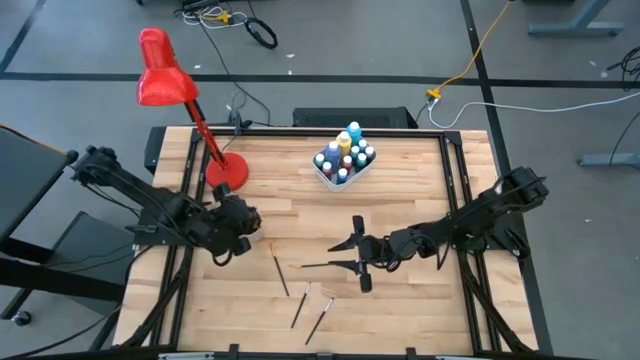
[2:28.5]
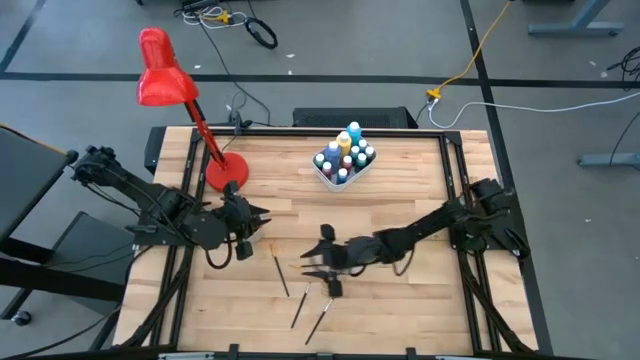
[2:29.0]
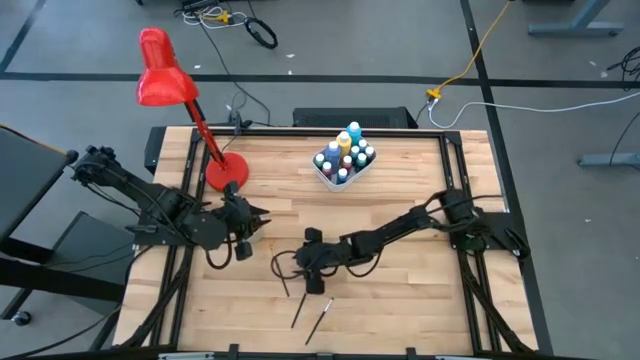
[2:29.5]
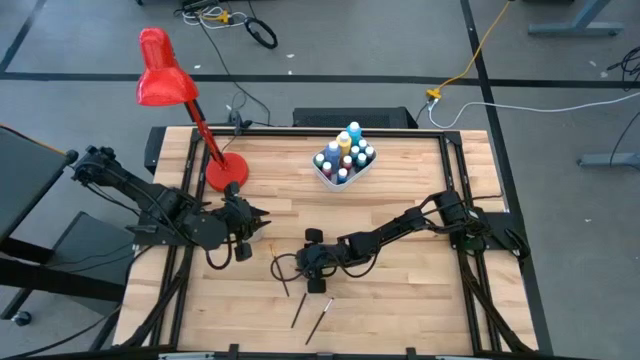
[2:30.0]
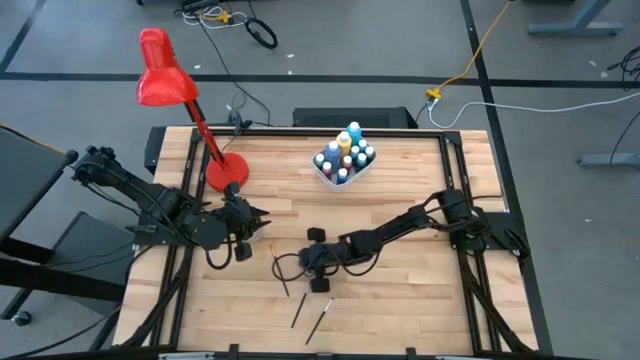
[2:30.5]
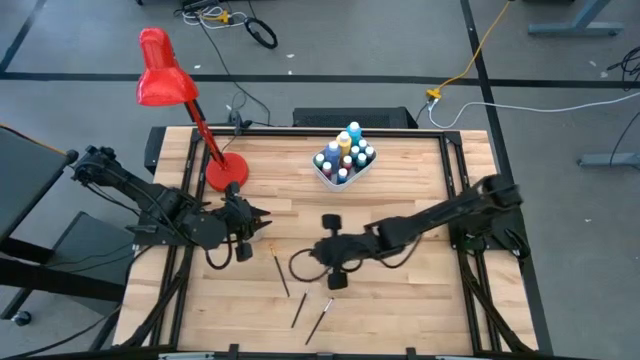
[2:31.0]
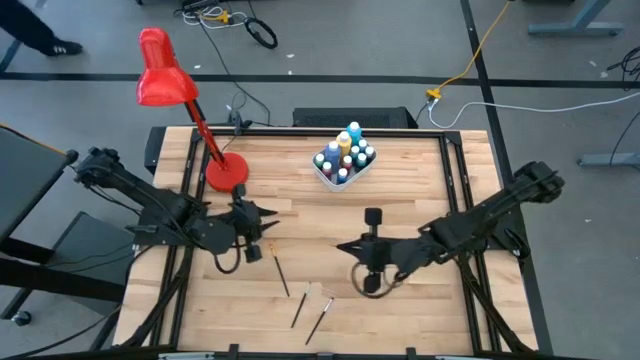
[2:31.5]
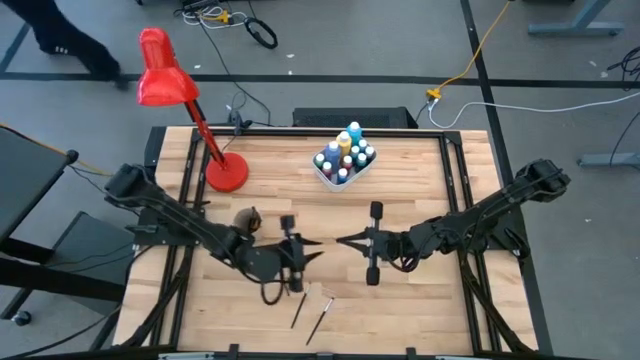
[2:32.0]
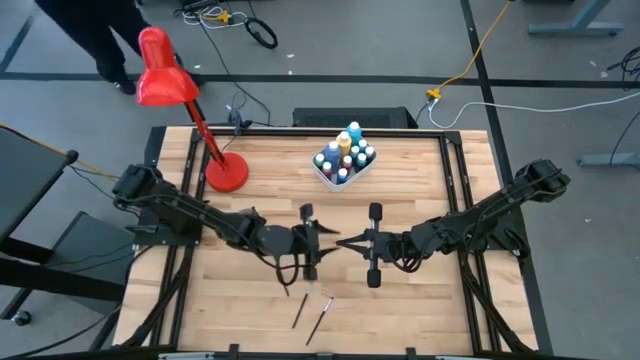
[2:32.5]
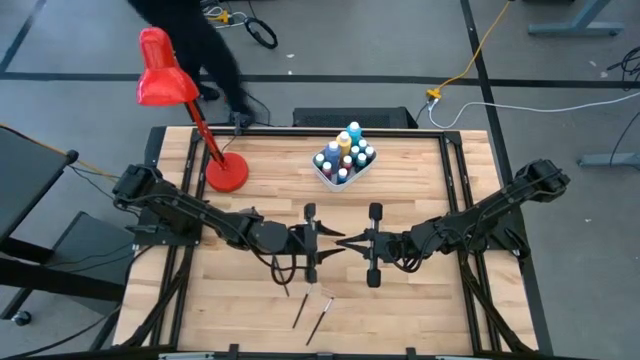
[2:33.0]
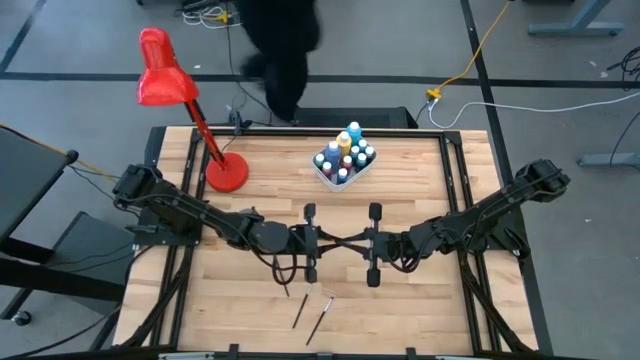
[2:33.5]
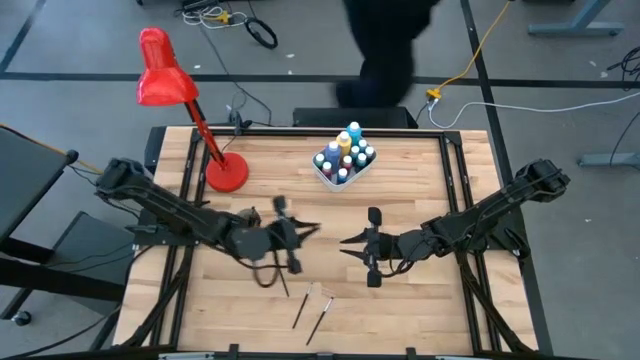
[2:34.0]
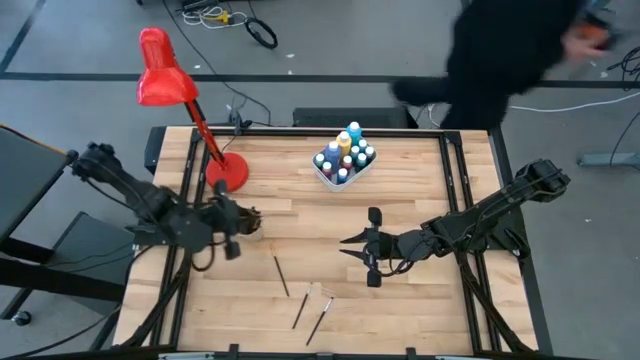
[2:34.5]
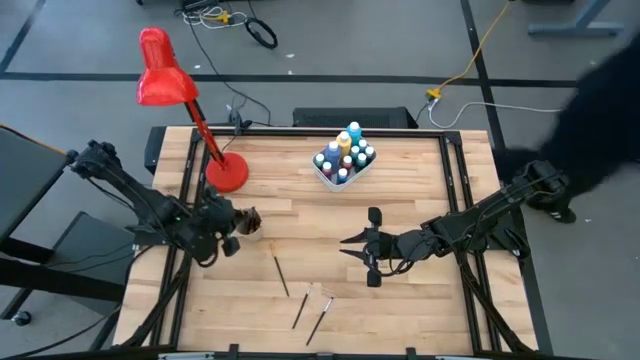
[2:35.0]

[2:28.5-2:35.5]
Task: Pick & Place Paint Supplies
Put the gold paint brush into the white cup

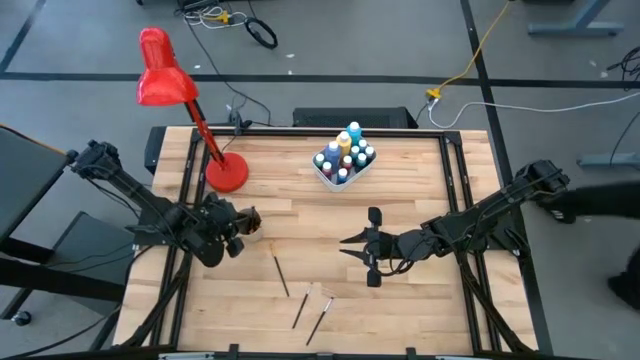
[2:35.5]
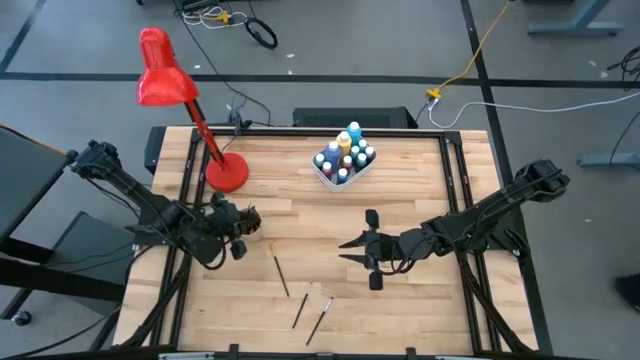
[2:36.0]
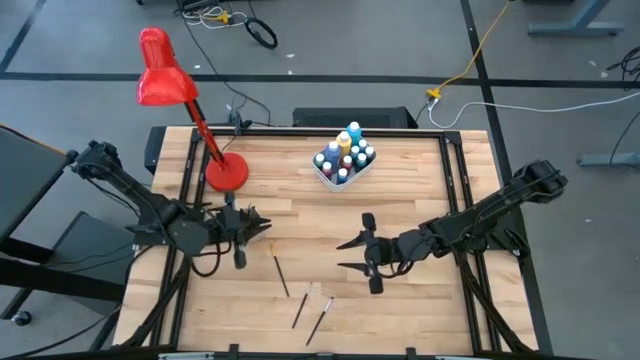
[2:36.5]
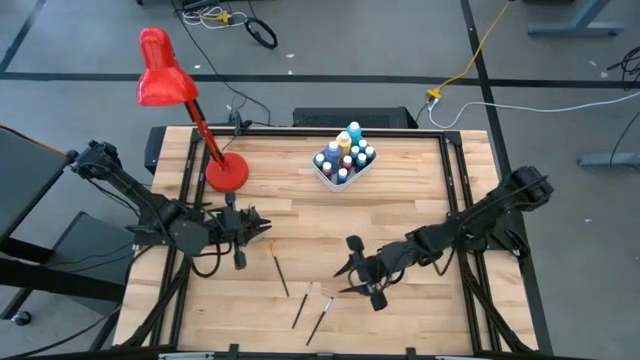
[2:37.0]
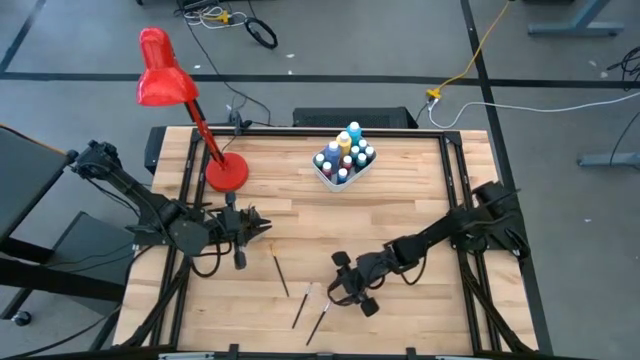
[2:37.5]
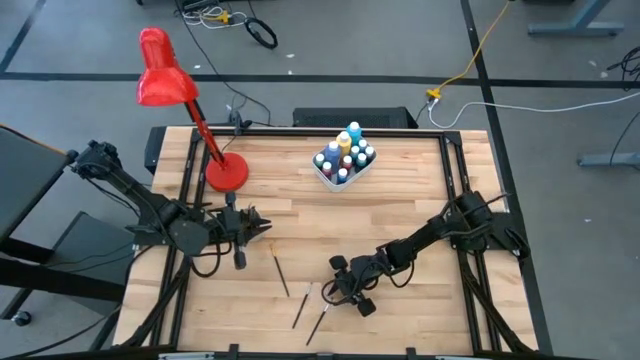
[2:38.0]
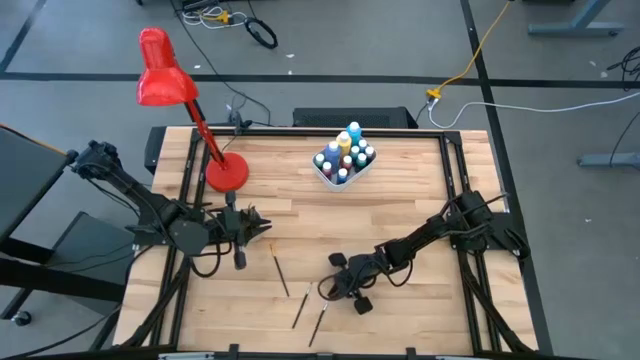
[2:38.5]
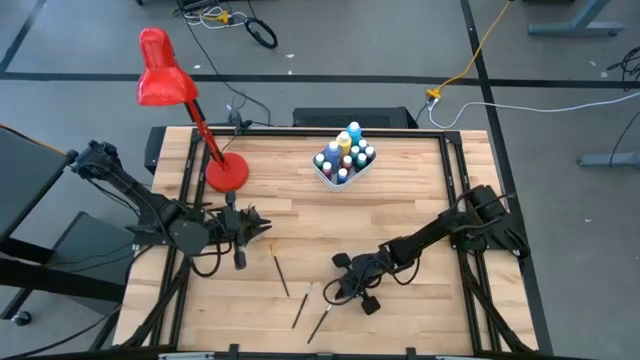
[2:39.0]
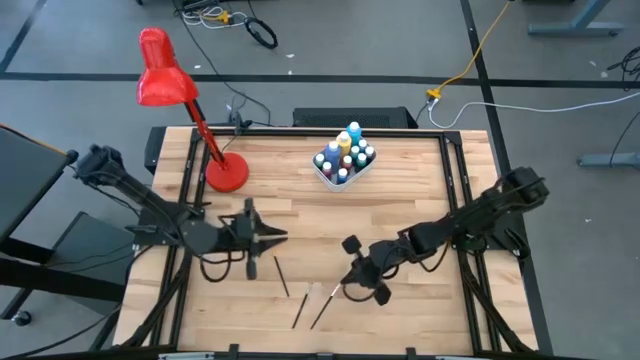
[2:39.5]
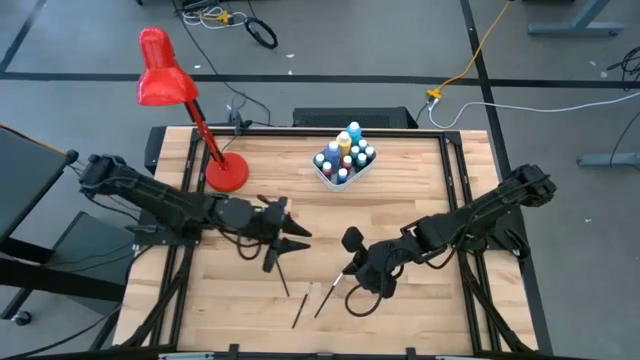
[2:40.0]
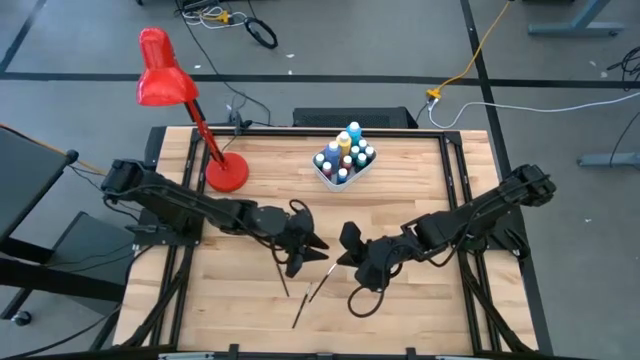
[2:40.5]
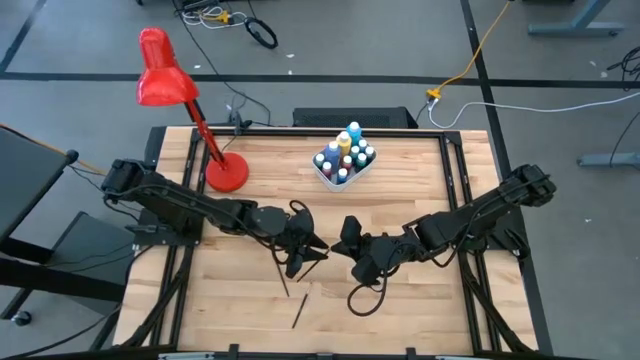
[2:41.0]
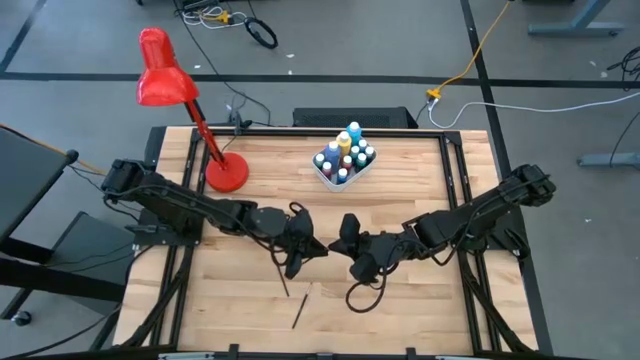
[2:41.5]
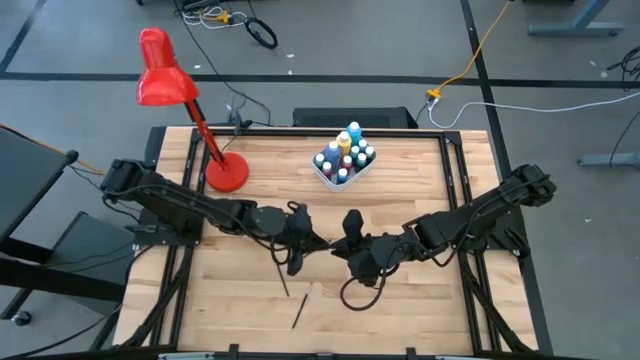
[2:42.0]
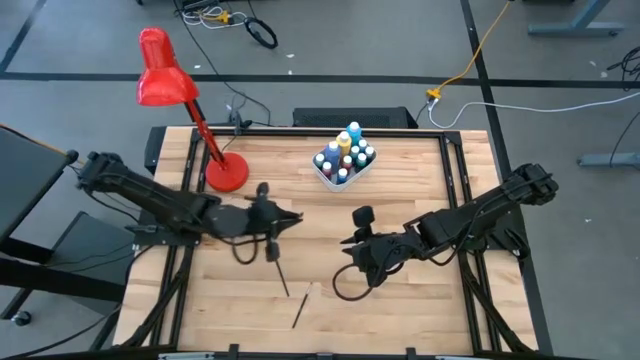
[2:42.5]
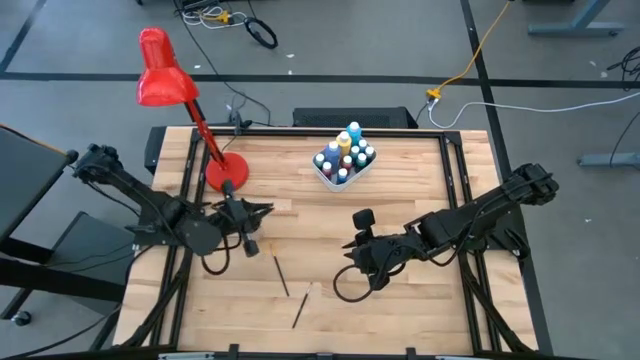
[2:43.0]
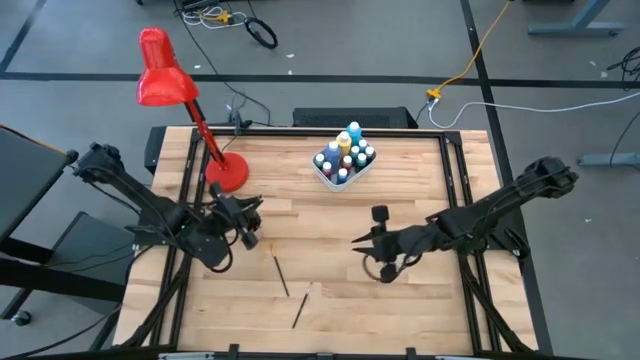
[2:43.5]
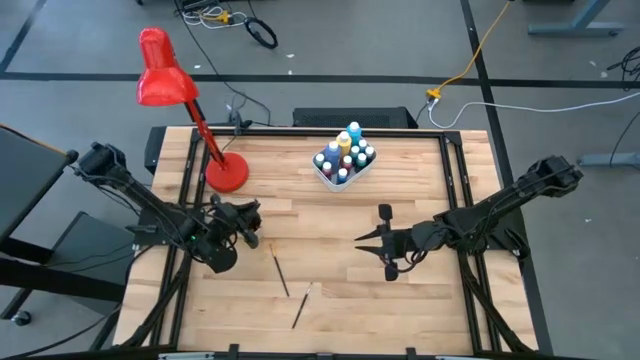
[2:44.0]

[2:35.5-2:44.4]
Put the silver paint brush into the white cup

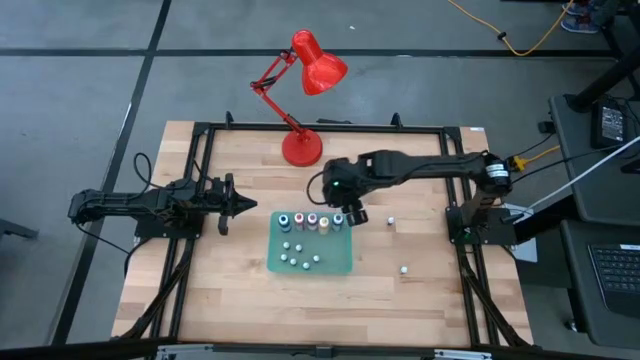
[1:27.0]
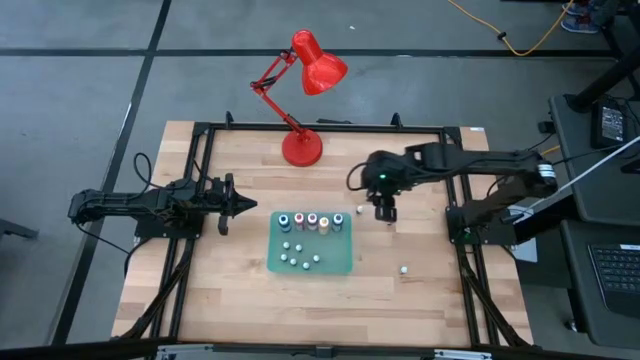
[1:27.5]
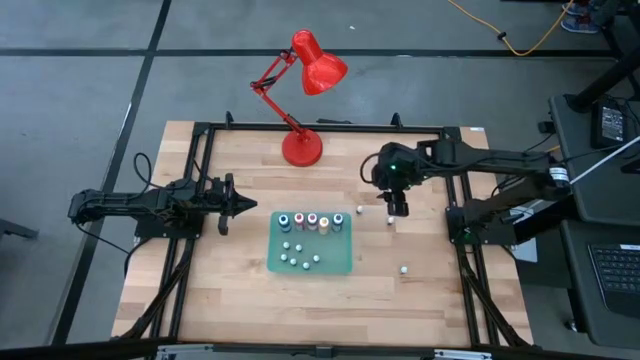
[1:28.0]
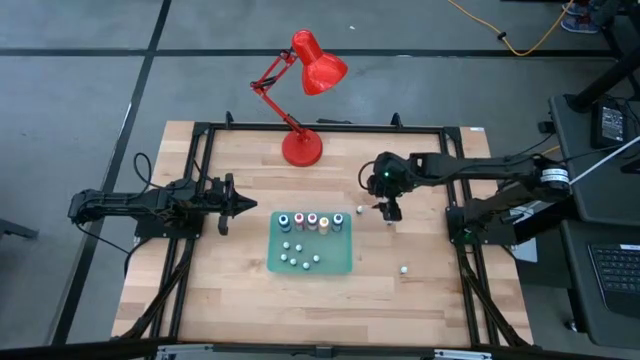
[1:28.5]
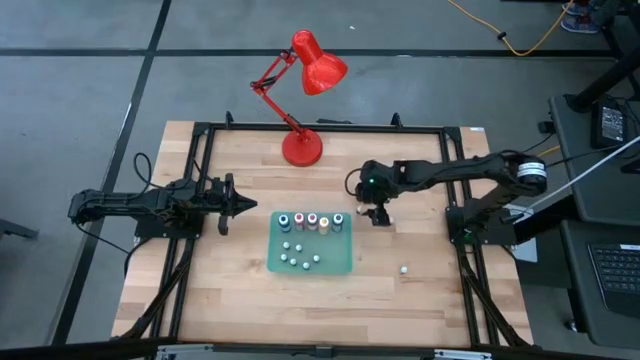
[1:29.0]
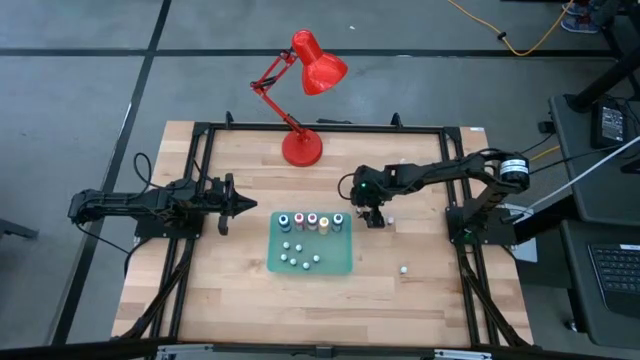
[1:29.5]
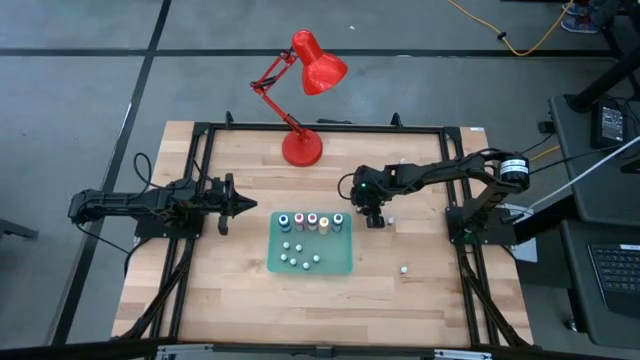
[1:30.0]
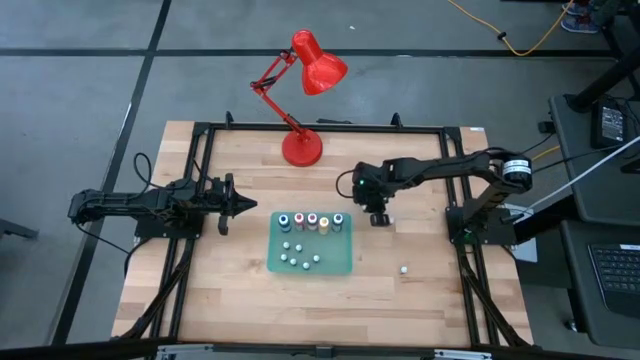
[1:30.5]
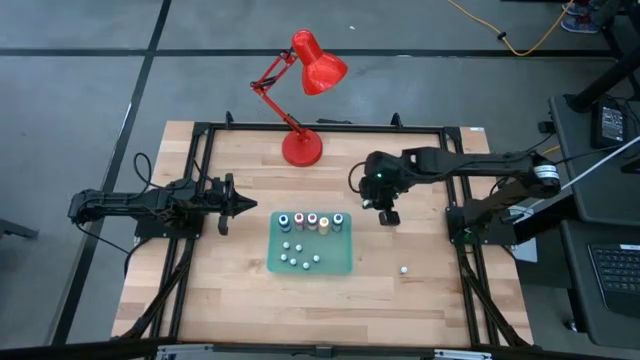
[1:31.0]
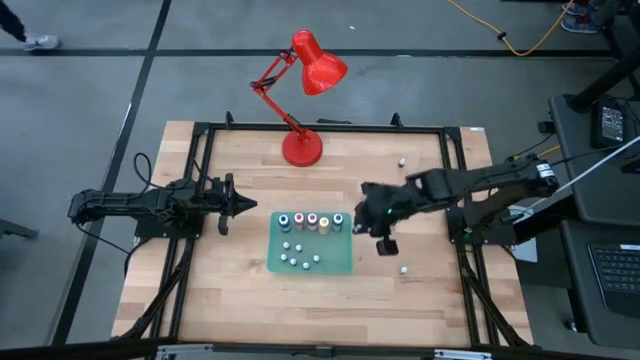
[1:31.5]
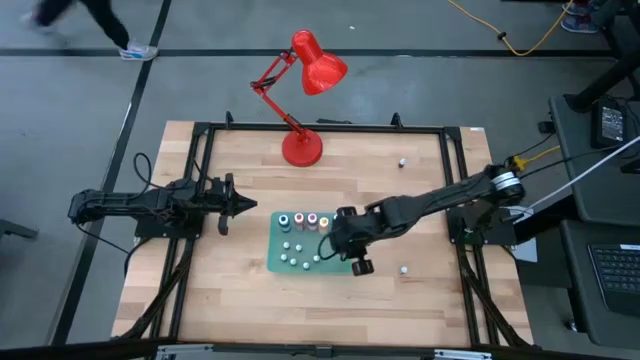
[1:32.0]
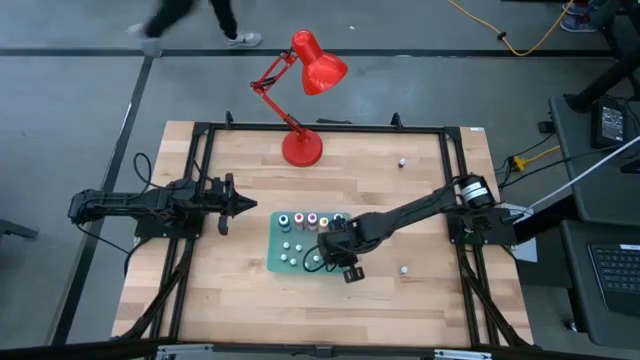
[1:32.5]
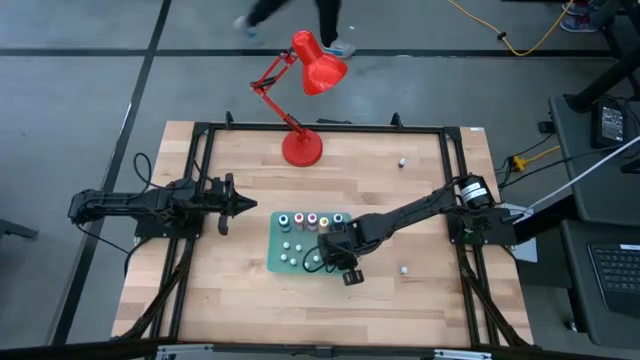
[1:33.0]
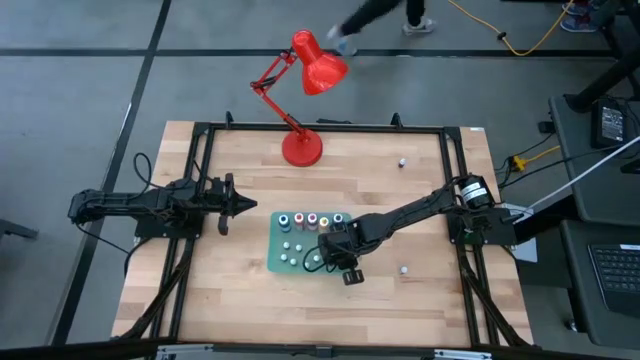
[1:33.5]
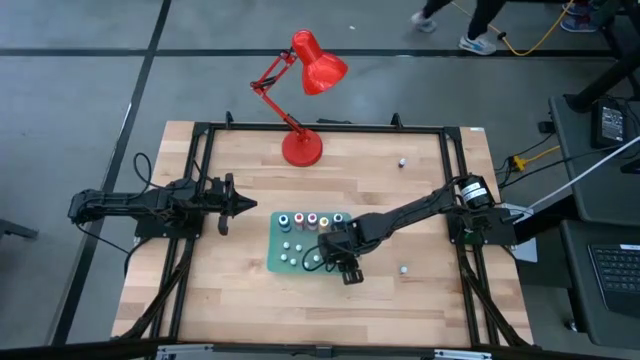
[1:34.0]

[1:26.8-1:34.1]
Task: Pick & Place food coloring
Put the small black bottle into the green bin
